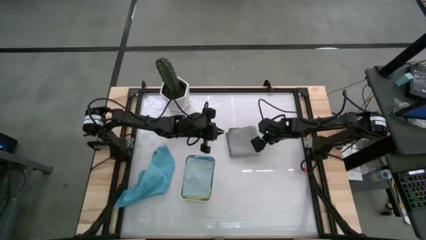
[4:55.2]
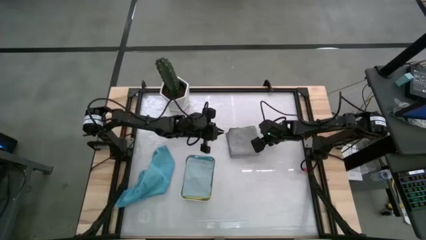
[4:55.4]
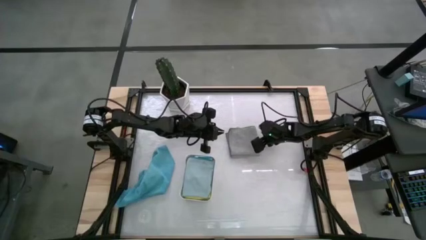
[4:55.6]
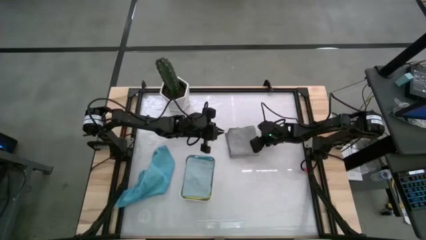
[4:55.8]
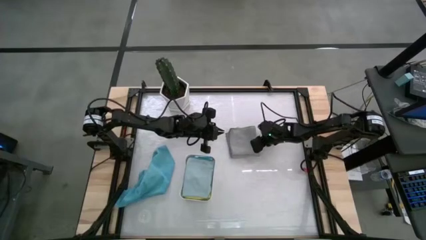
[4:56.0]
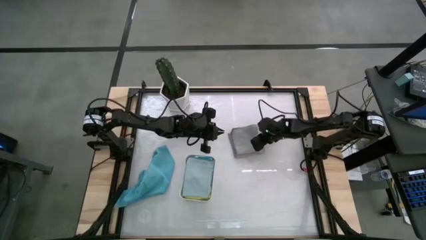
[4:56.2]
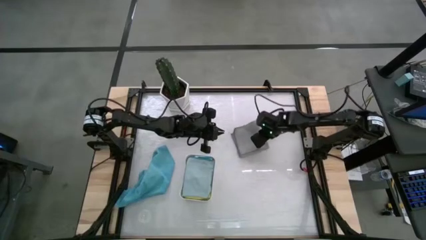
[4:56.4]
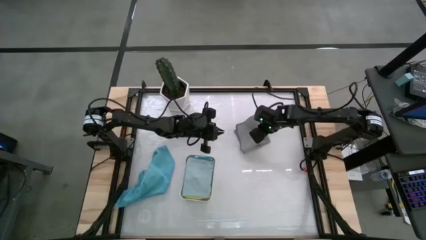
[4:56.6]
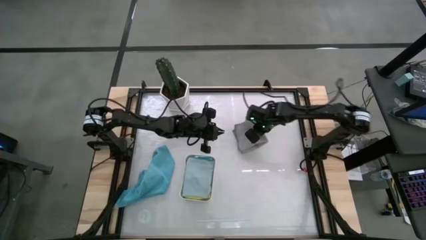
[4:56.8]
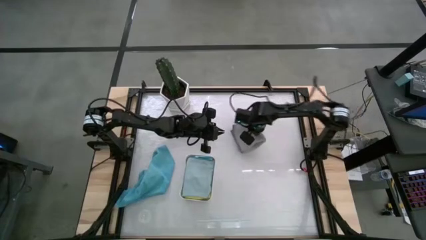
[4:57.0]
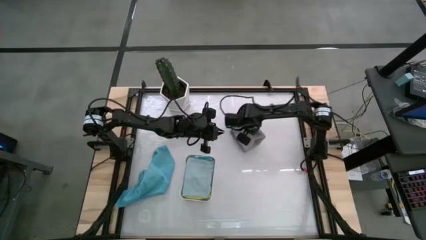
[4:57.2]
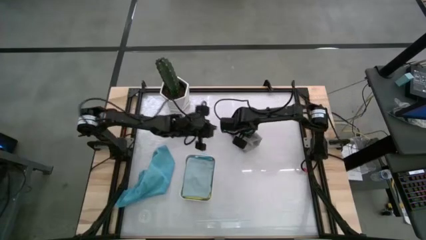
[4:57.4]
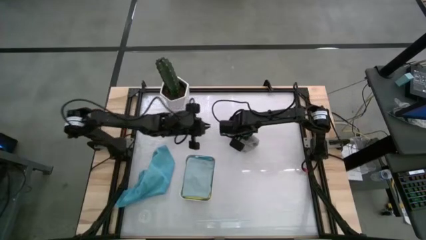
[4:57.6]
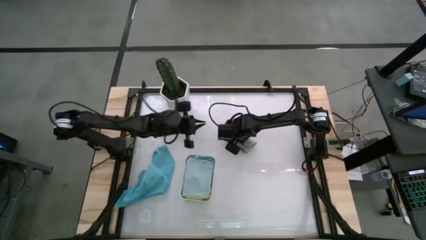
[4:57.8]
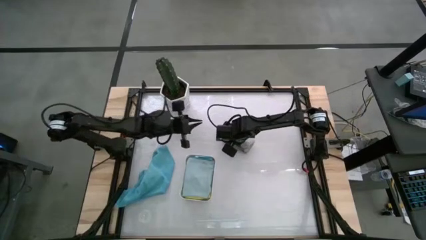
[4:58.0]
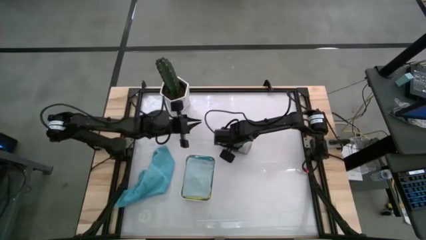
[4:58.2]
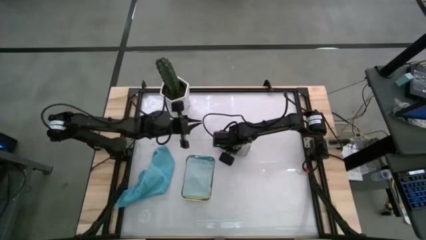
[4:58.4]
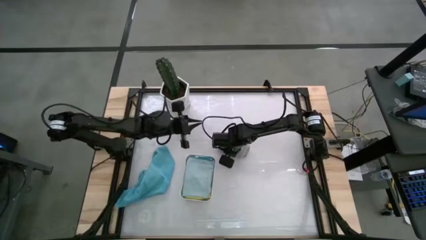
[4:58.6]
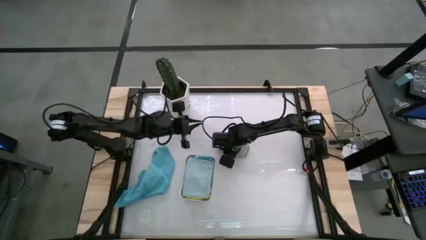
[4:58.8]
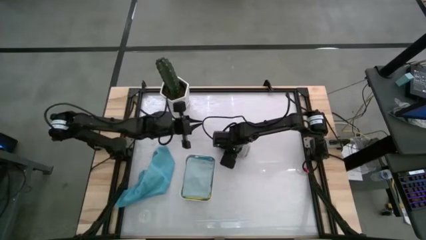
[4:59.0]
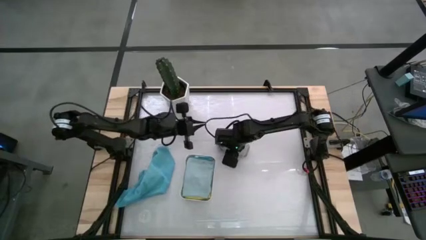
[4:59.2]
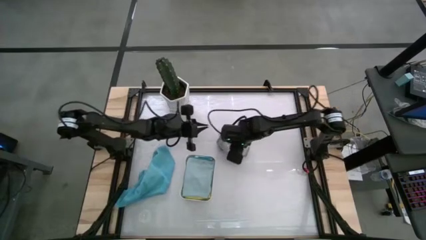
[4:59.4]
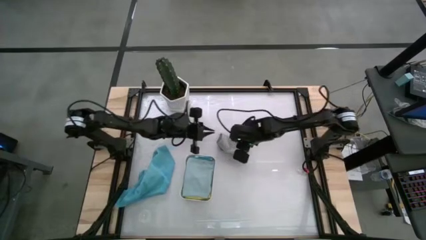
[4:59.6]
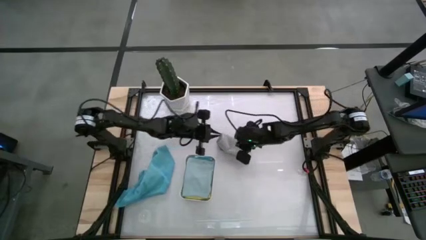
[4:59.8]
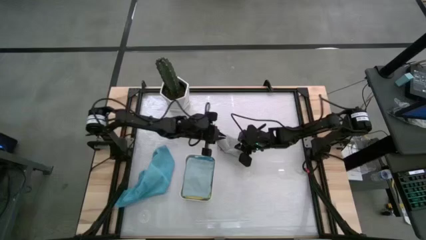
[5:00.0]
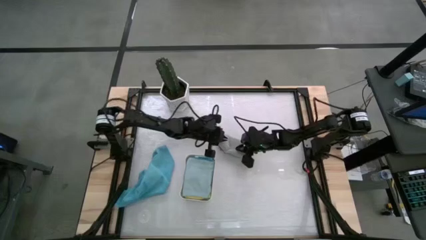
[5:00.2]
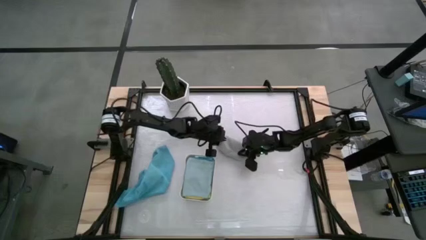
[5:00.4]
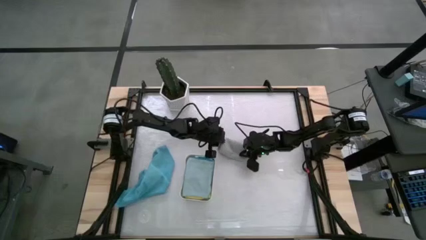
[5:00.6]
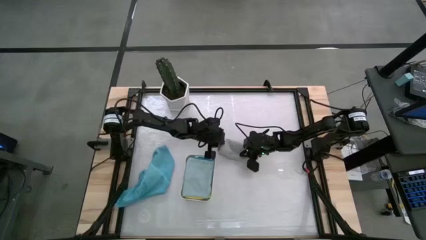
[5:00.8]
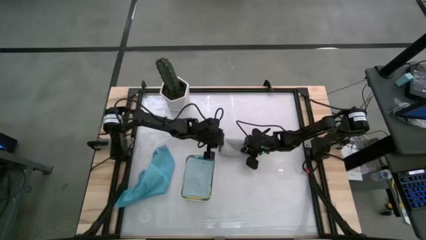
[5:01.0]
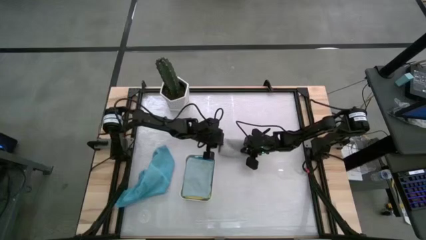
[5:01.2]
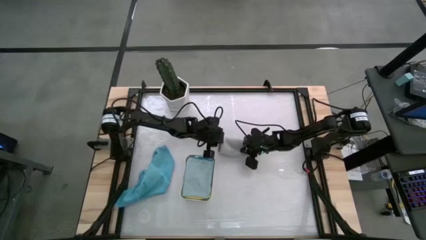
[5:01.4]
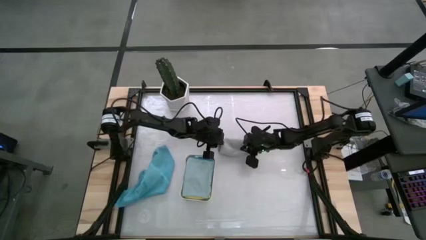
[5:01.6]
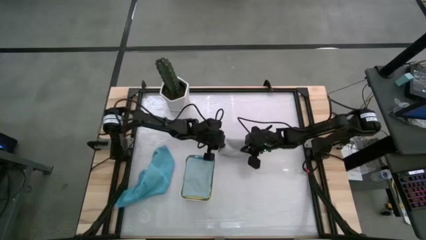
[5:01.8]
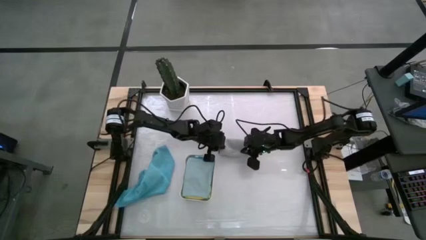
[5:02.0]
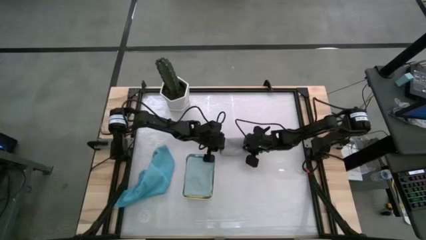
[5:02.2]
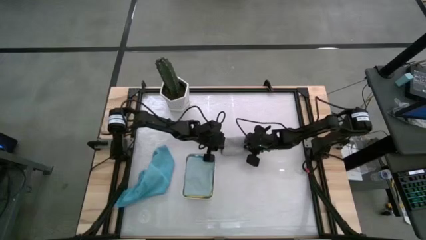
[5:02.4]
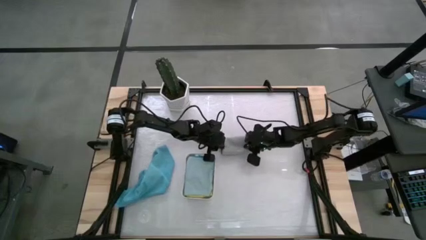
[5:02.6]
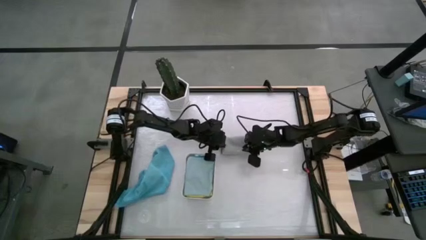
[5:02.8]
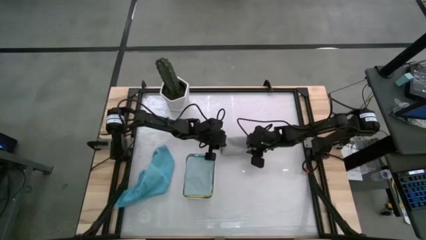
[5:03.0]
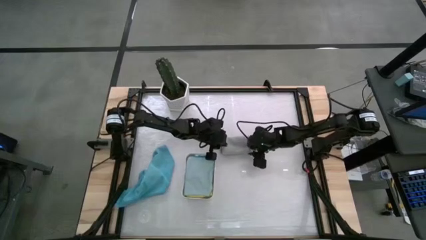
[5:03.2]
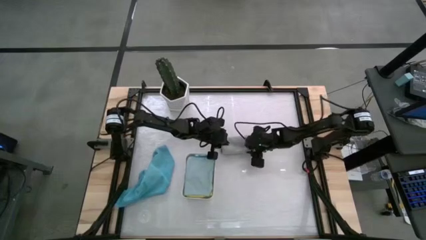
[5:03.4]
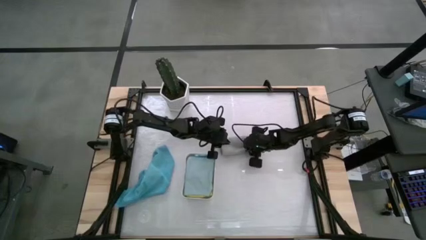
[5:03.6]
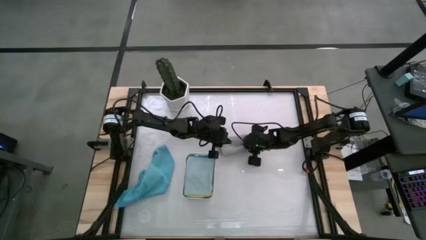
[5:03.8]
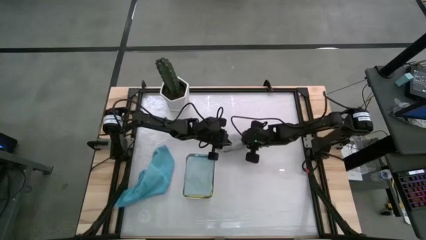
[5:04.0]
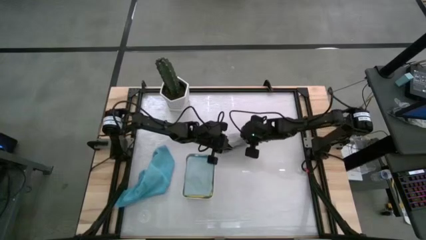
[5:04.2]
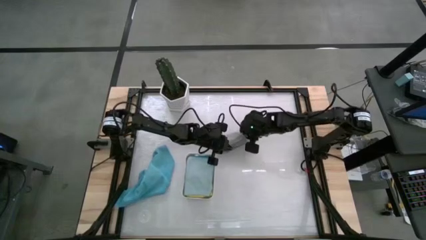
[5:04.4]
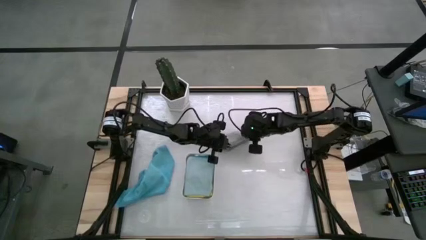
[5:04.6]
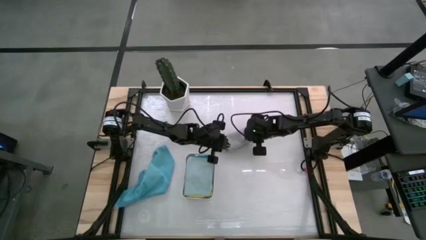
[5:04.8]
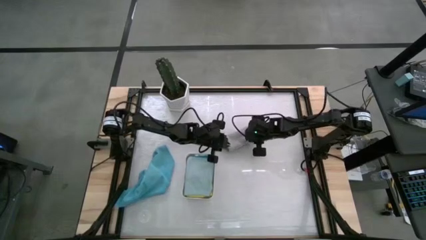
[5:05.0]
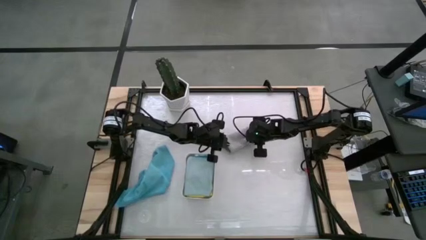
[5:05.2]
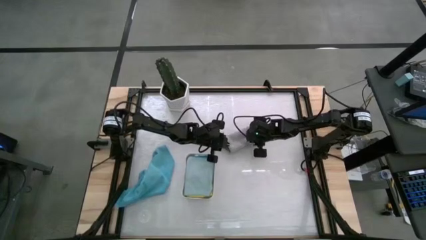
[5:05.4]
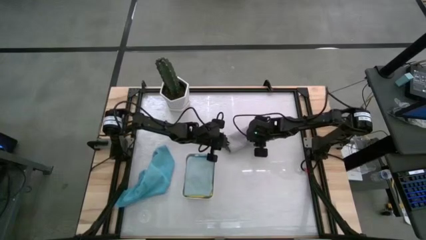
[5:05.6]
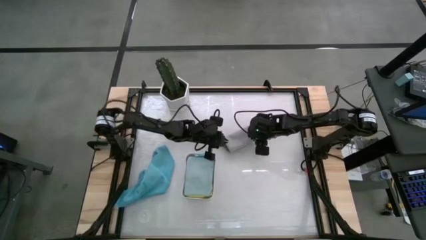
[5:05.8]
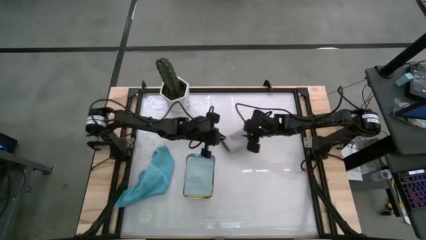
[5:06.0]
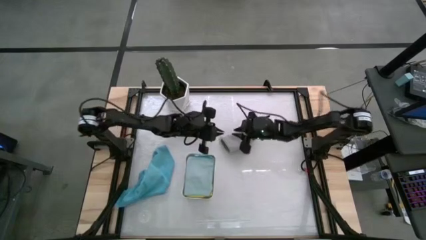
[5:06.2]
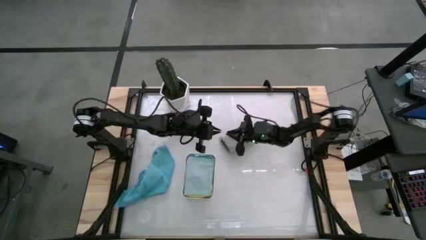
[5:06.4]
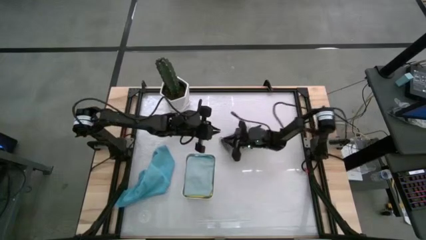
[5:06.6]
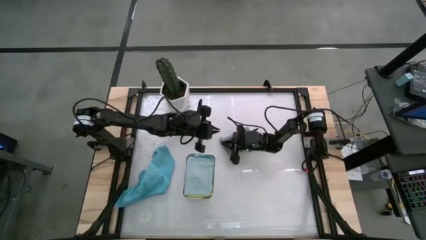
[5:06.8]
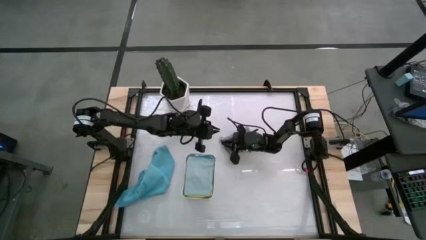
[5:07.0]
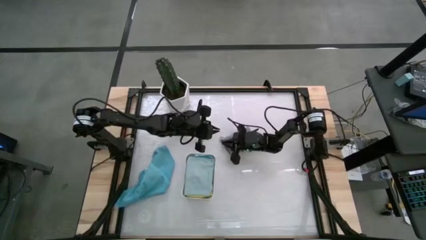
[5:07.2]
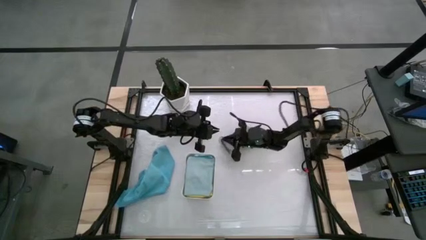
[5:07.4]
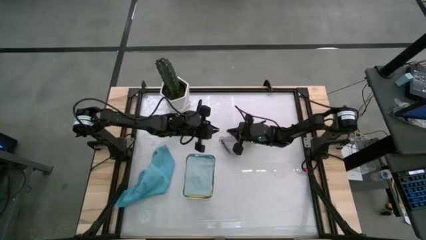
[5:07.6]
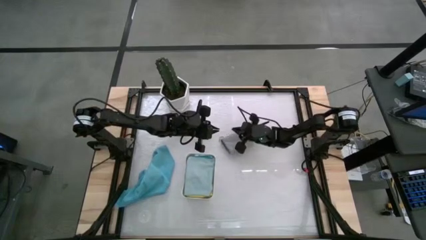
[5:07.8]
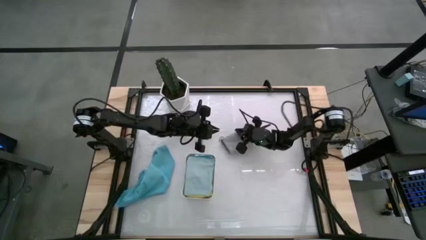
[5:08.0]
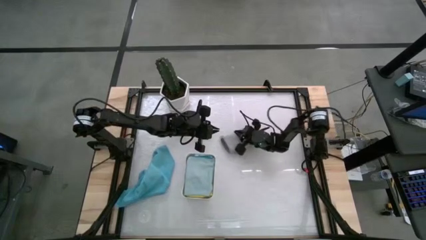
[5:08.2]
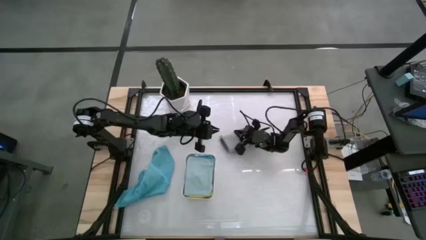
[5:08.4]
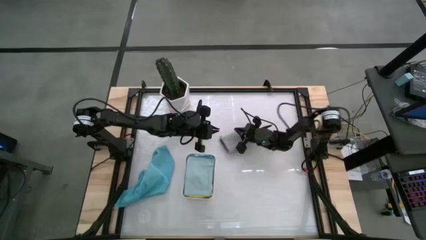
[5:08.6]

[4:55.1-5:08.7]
Task: Fold microfiber towels
Fold the gray microfiber towel
